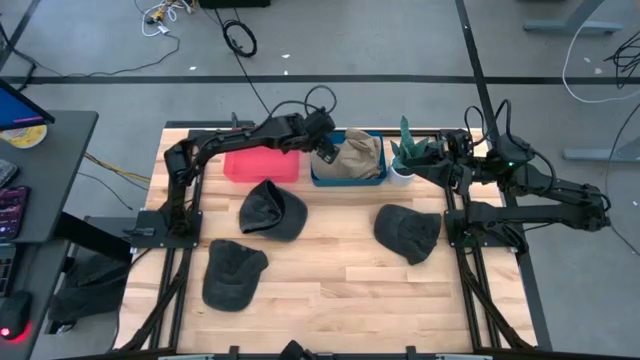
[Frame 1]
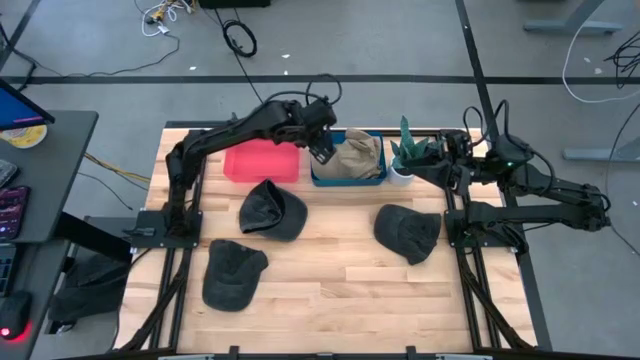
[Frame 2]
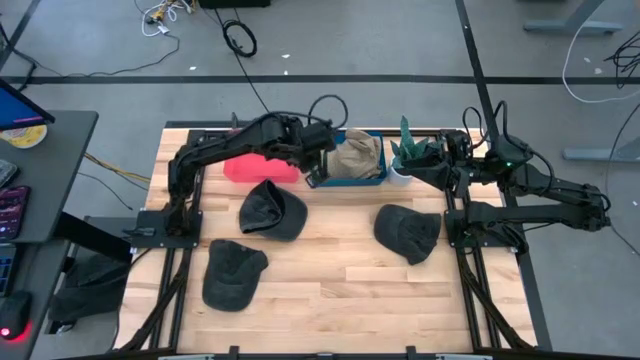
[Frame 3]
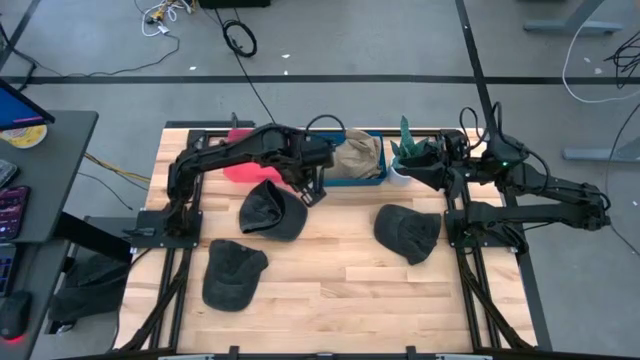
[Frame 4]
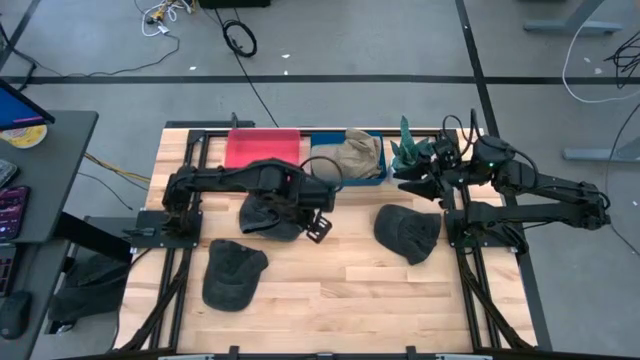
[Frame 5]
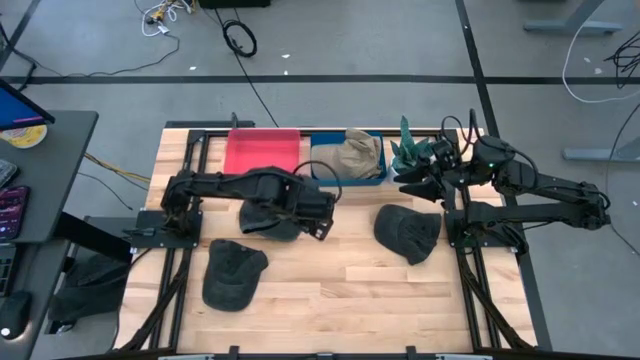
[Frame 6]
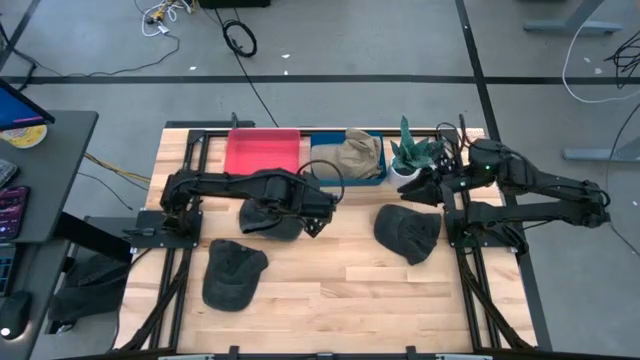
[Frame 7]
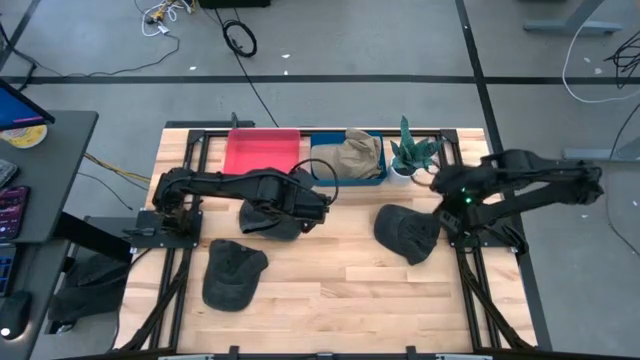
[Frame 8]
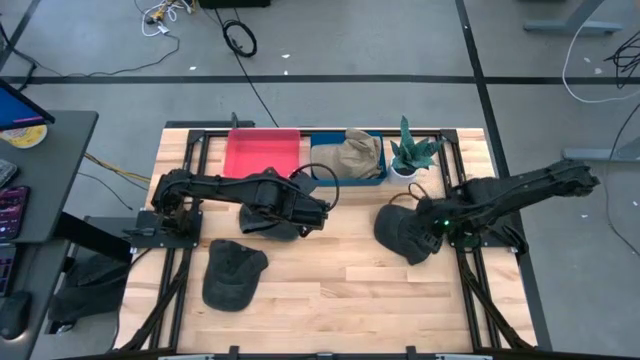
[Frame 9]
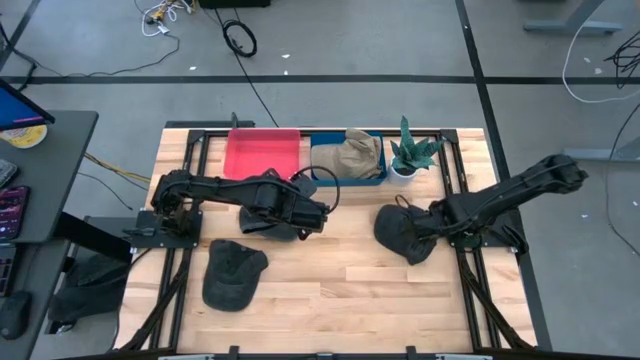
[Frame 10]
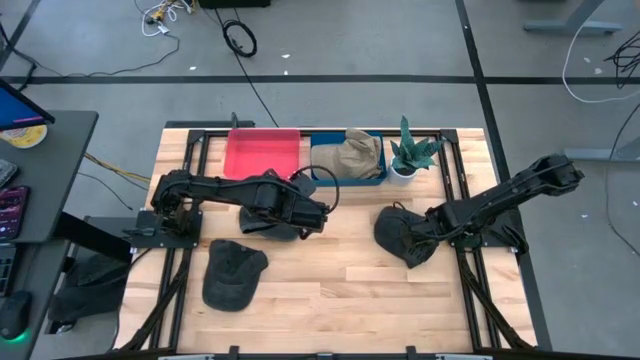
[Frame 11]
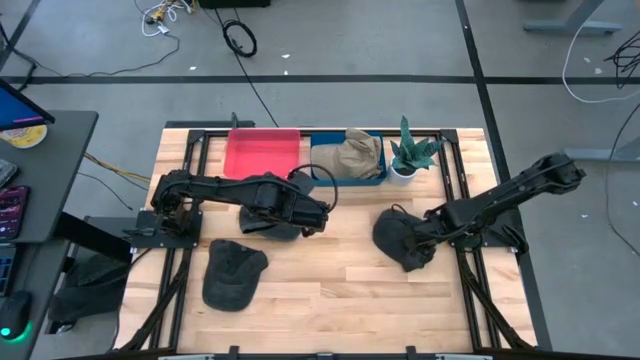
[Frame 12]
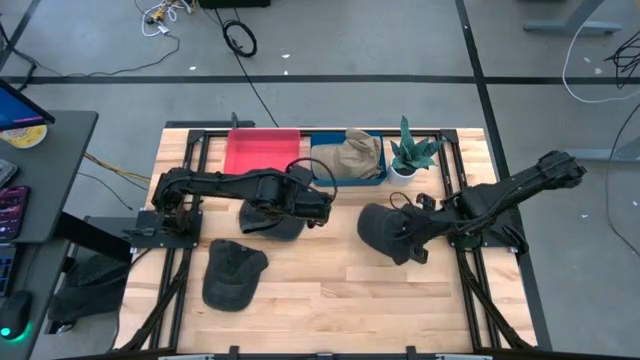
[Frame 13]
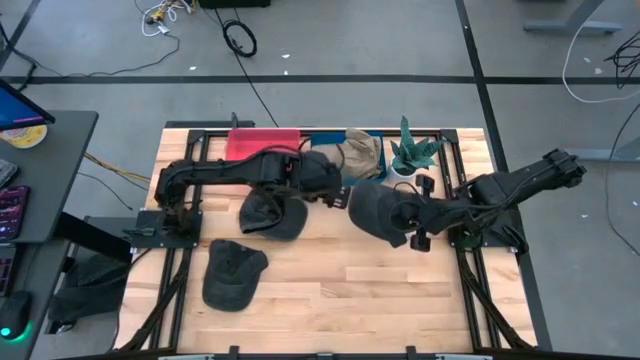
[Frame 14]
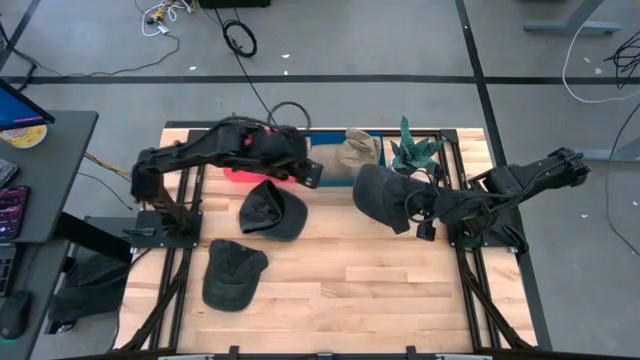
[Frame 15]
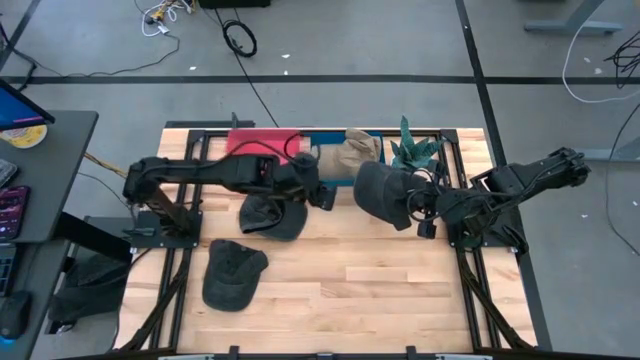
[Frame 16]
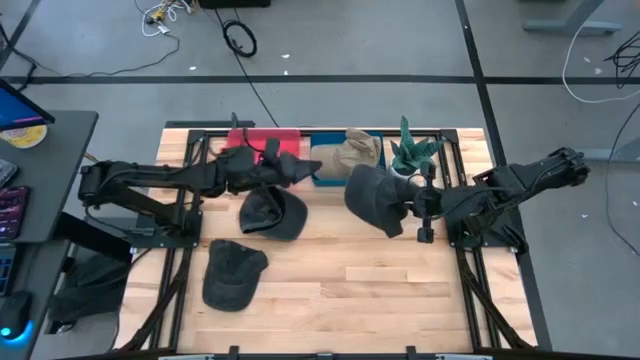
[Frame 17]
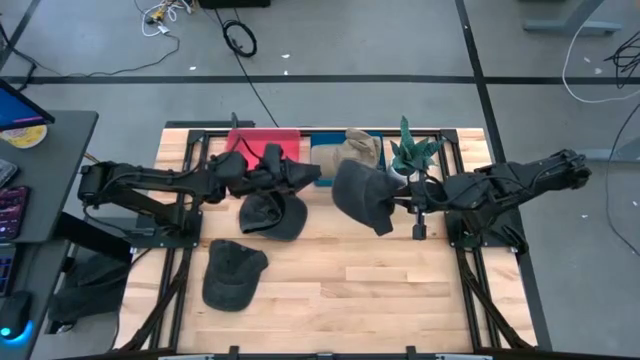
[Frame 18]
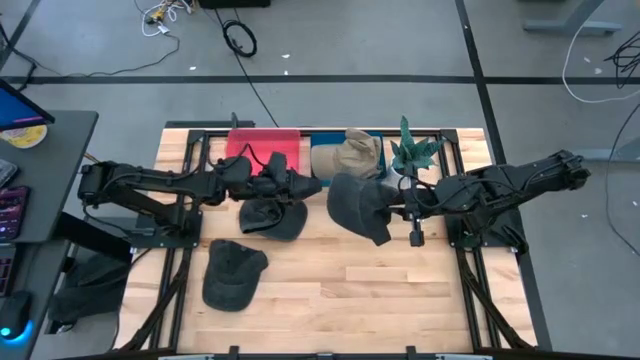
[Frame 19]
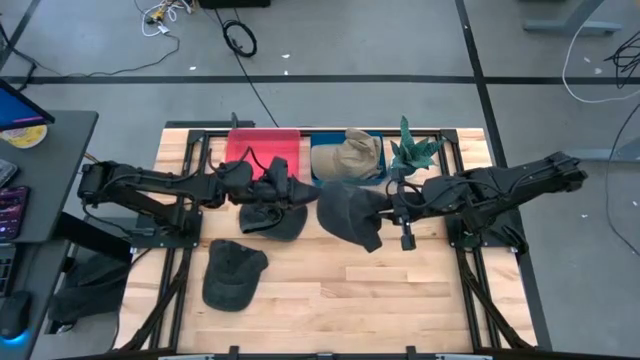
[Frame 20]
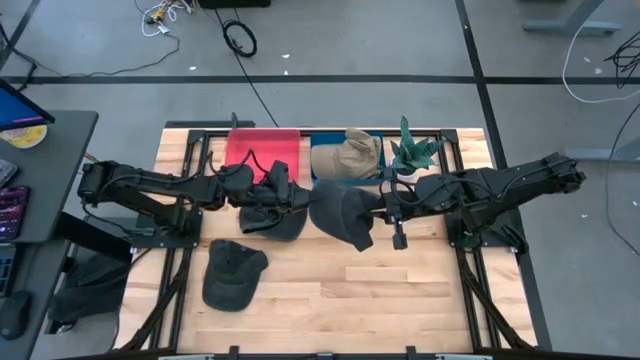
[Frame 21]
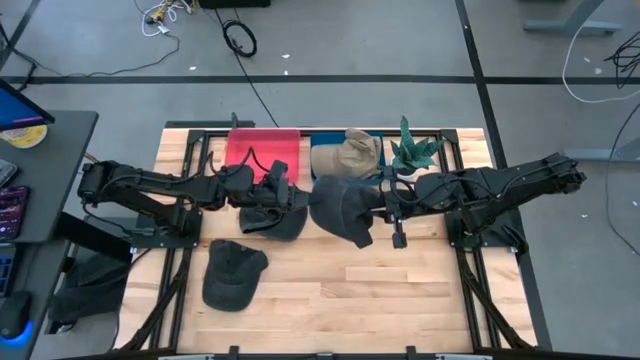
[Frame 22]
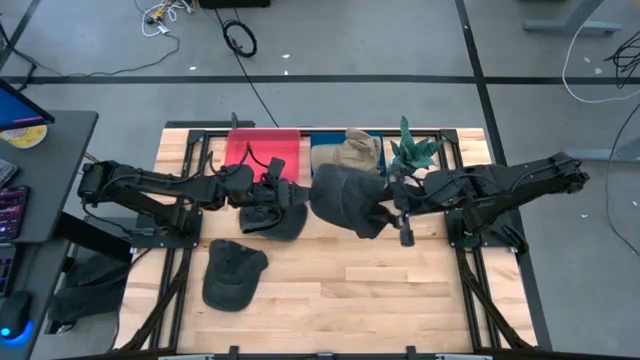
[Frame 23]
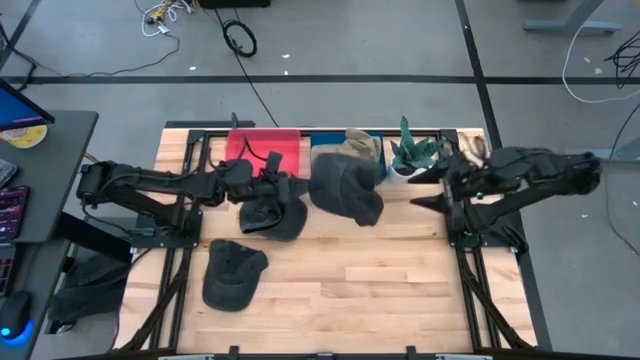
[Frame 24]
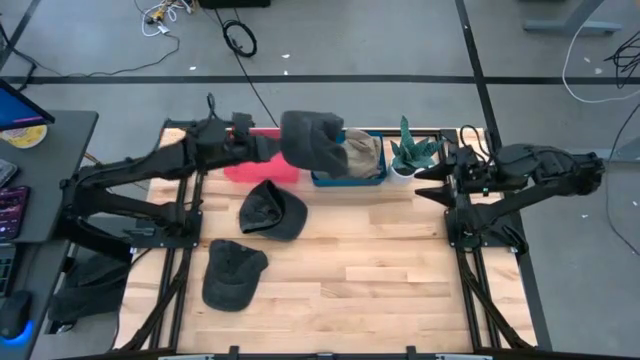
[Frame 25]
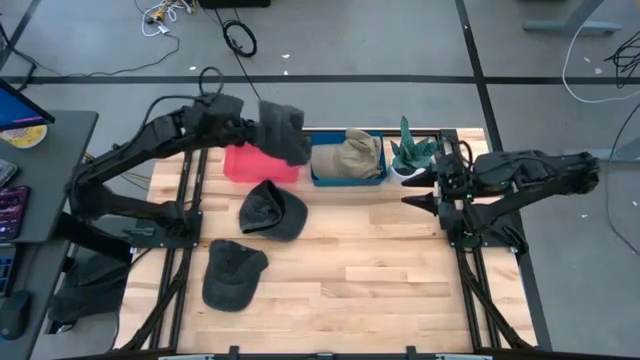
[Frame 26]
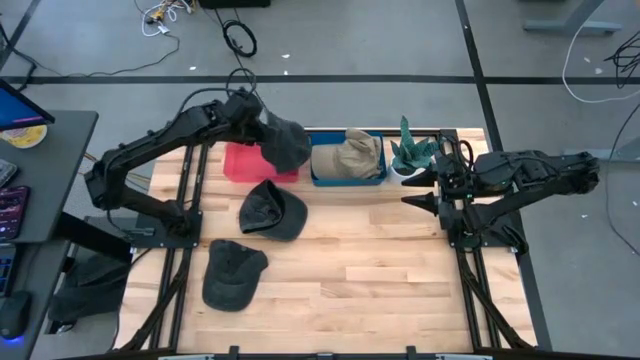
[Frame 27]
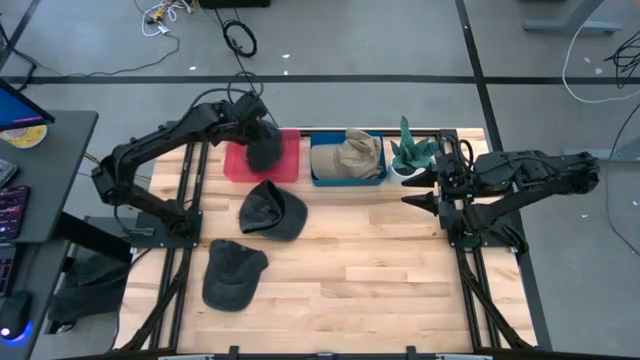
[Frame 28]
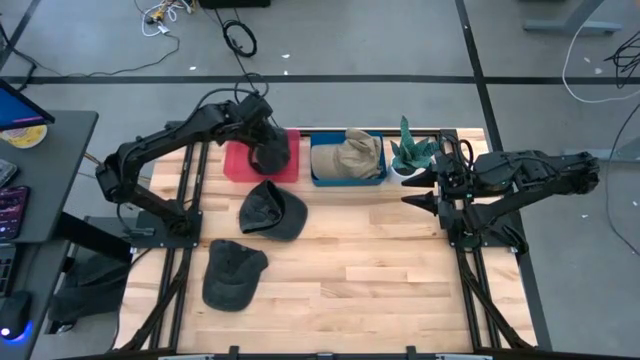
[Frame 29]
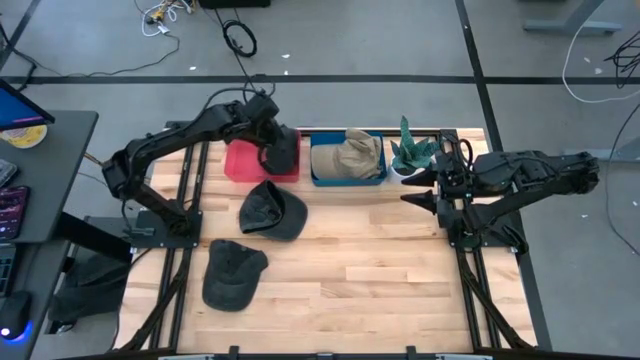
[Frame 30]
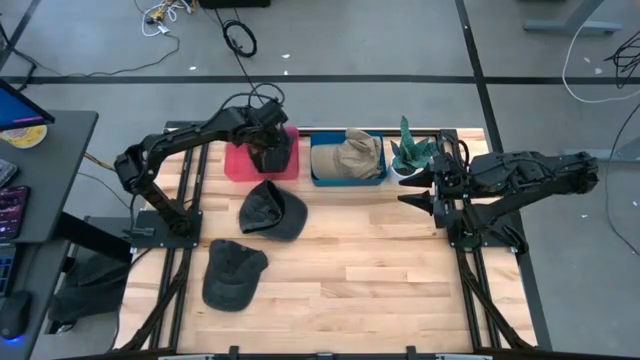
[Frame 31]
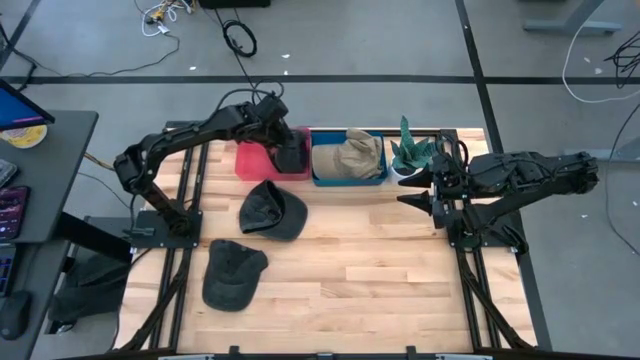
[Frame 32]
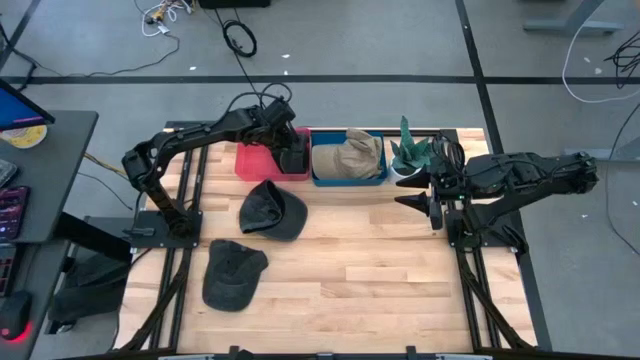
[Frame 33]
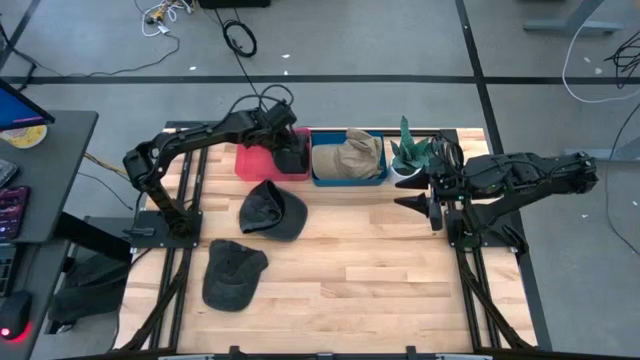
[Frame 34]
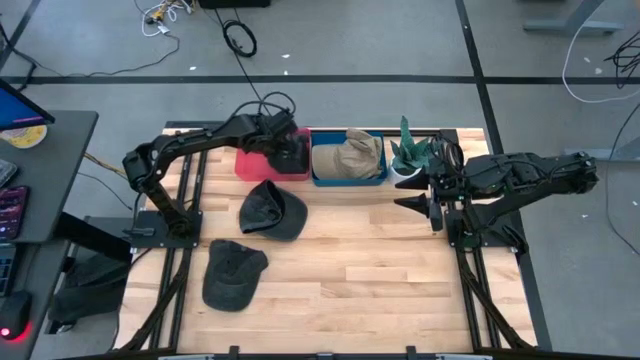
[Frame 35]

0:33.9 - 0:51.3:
Task: Pick & Place hat
Put the top right black cap into the red bin

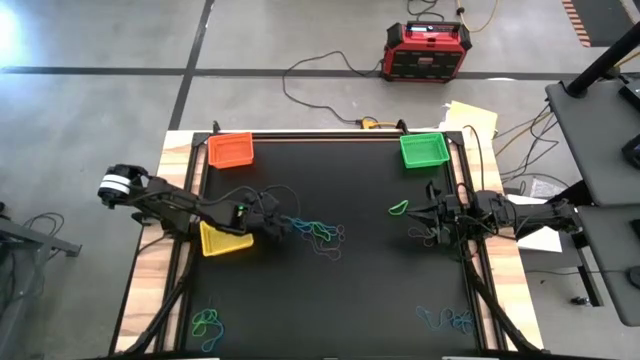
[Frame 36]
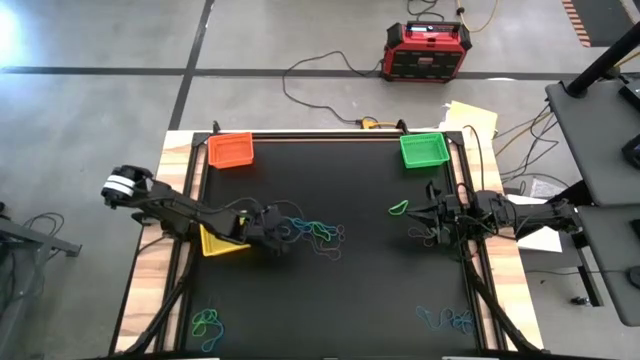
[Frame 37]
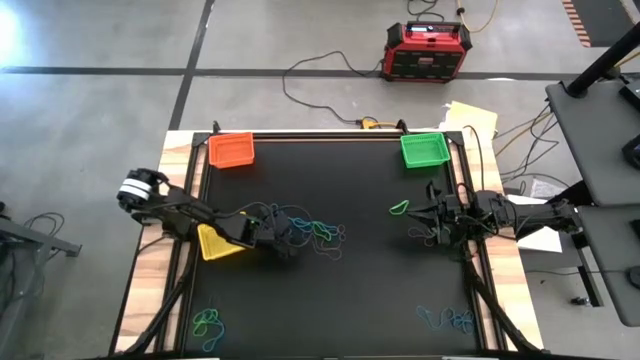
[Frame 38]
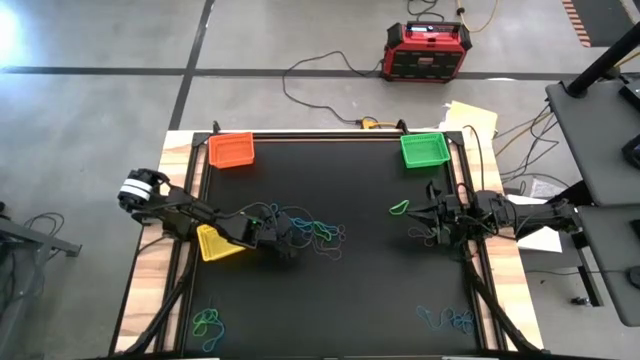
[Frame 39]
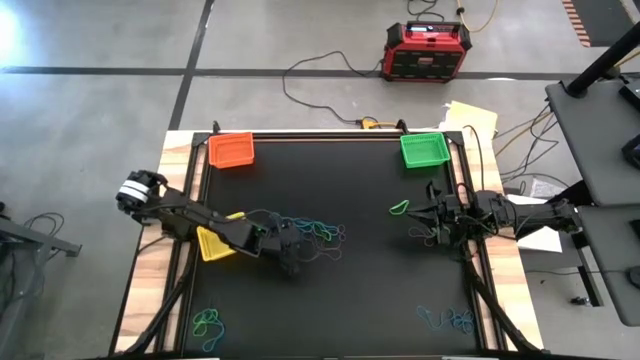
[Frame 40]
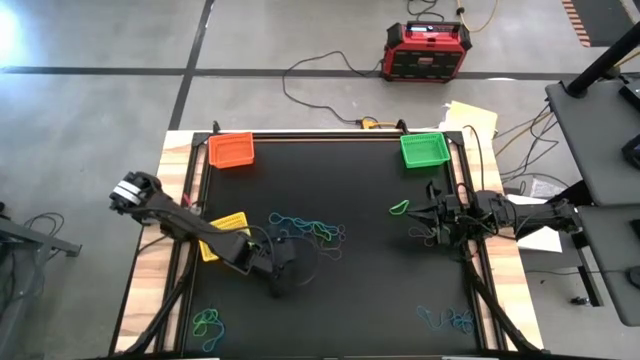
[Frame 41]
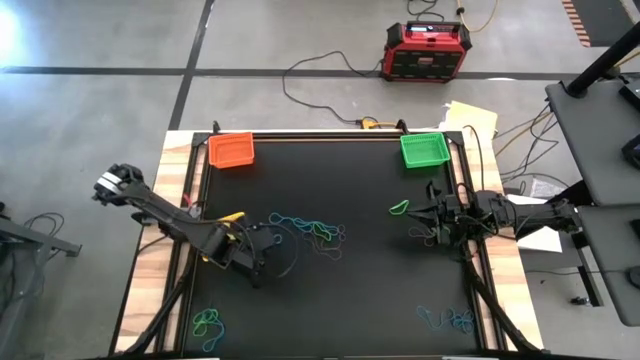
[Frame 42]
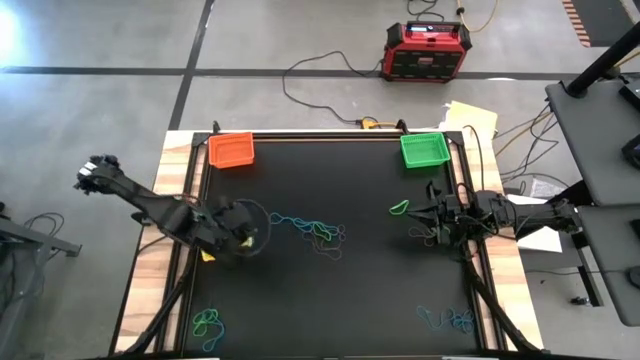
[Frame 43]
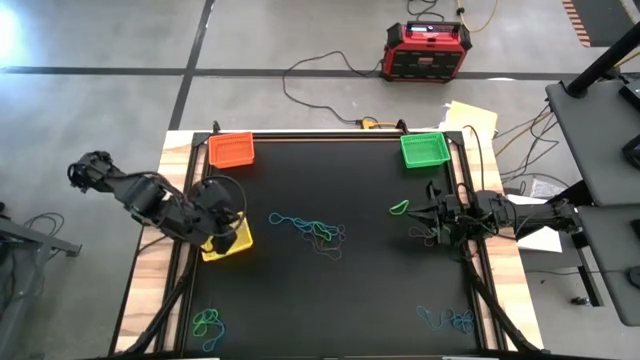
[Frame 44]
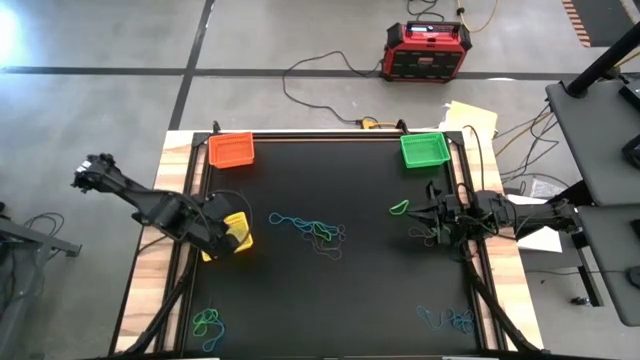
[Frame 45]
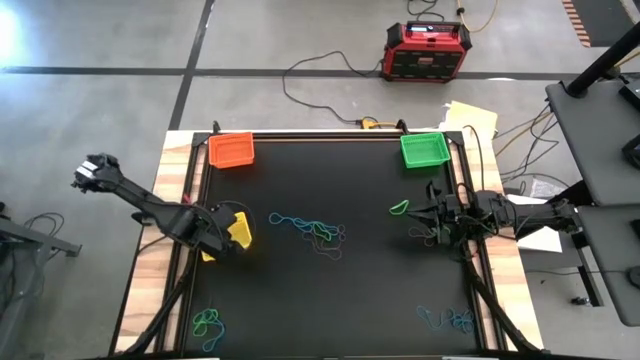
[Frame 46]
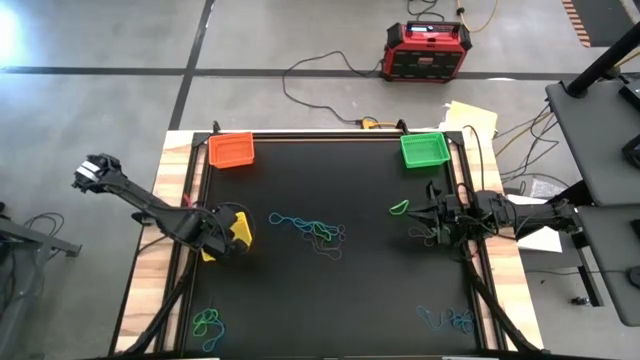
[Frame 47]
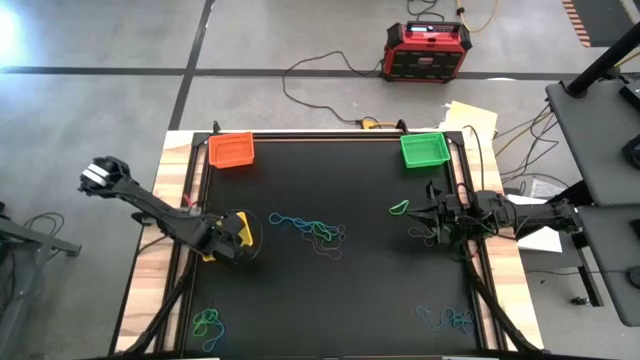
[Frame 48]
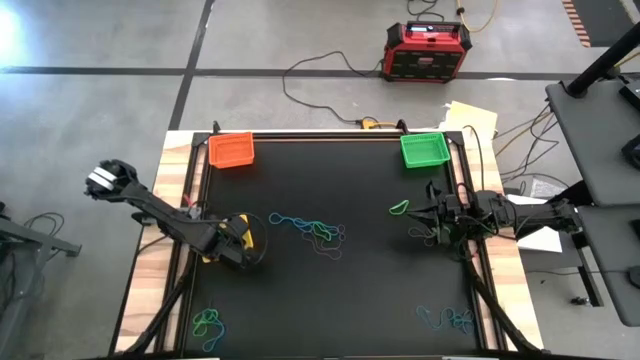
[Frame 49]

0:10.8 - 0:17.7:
Task: Sort rubber bands into baskets
Put the blue rubber band into the yellow bin
